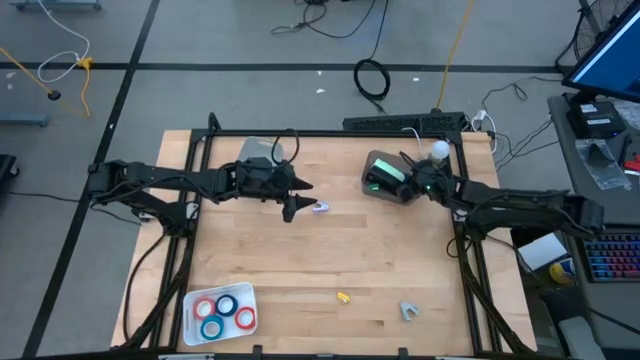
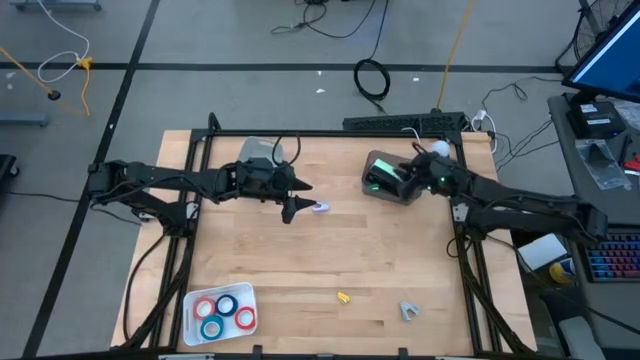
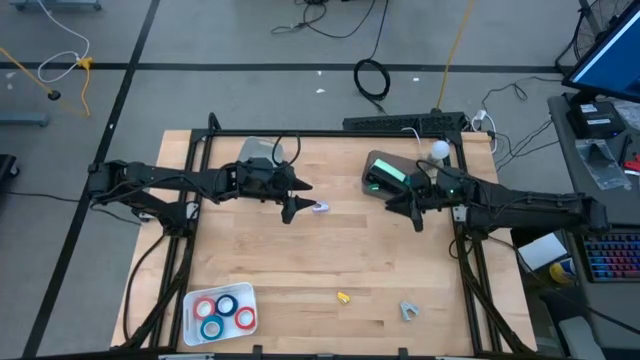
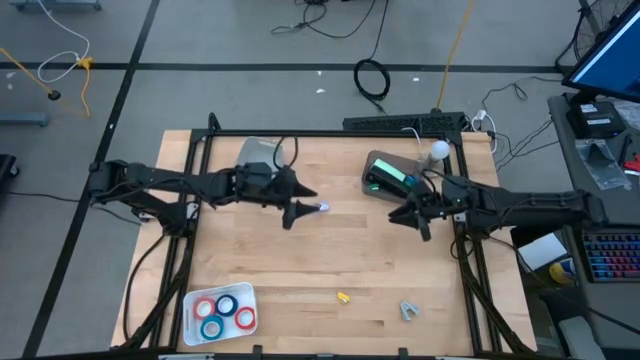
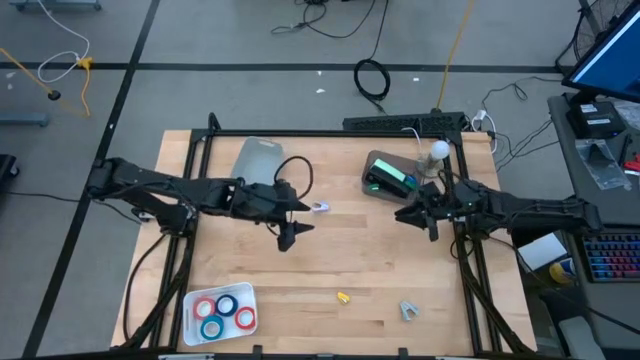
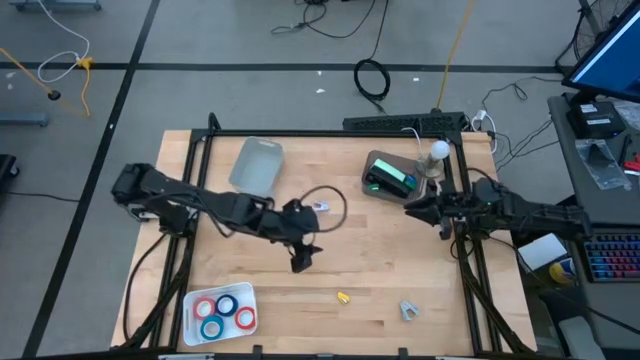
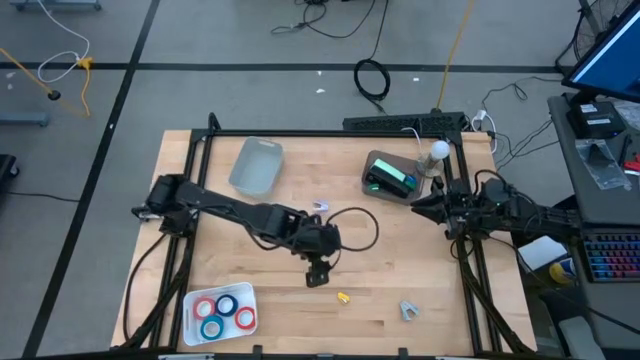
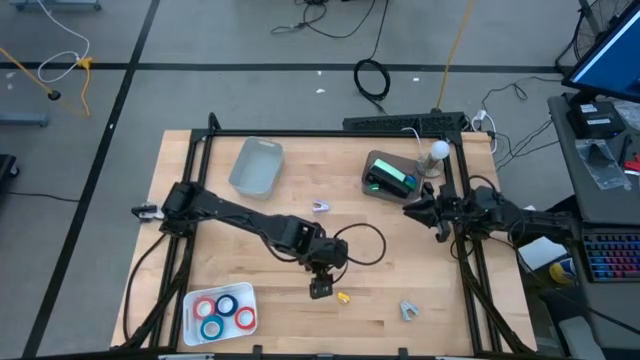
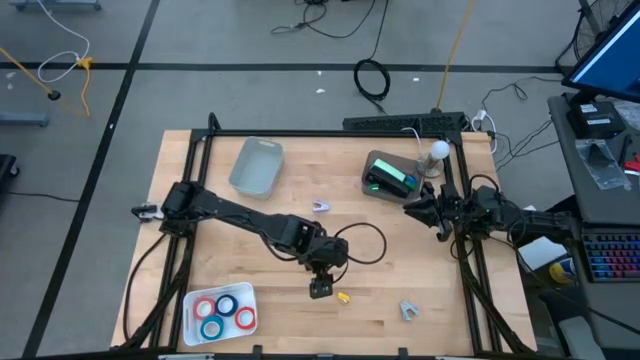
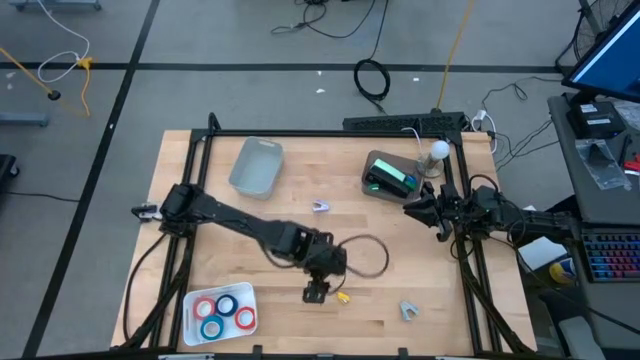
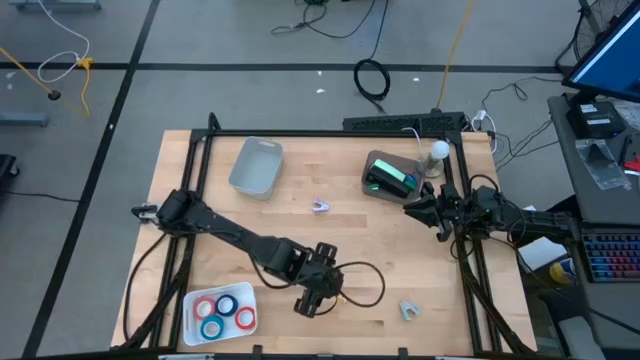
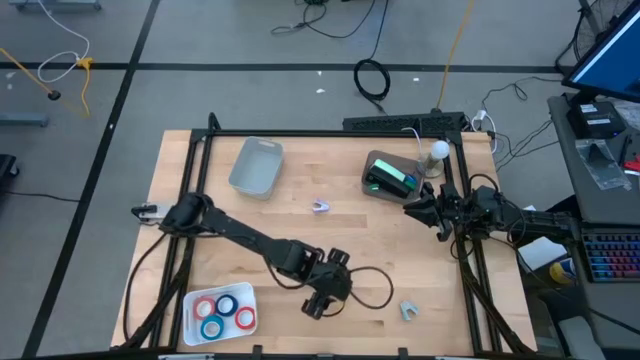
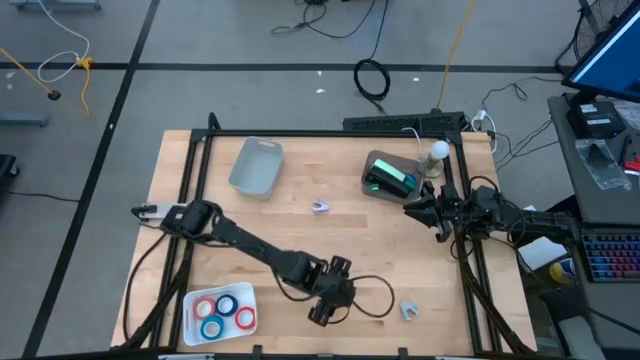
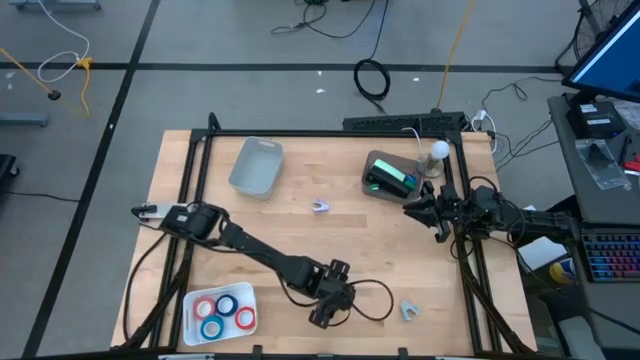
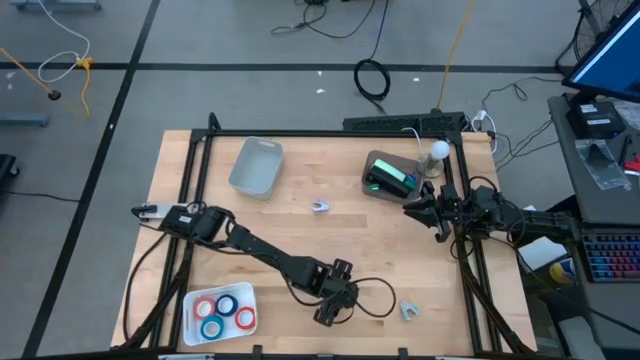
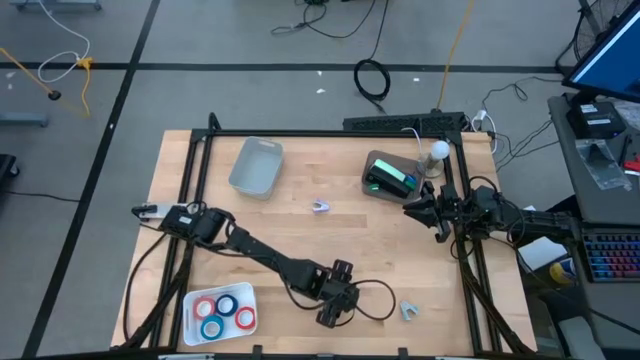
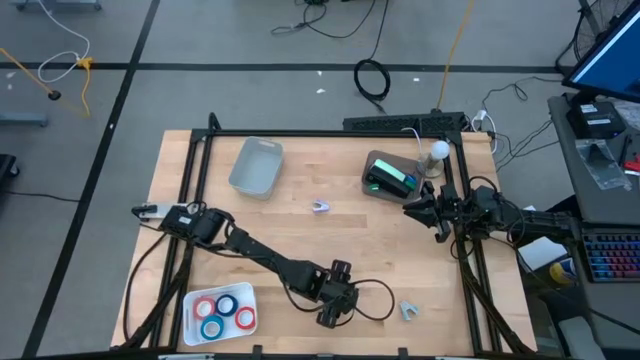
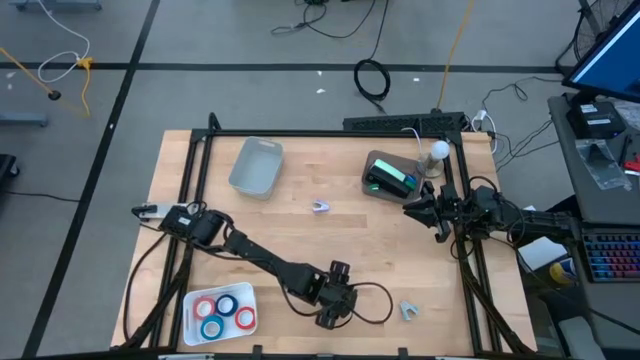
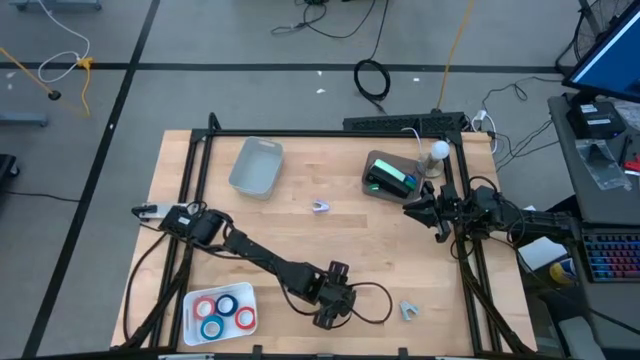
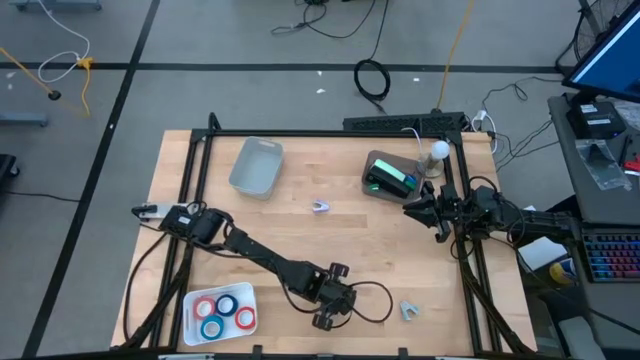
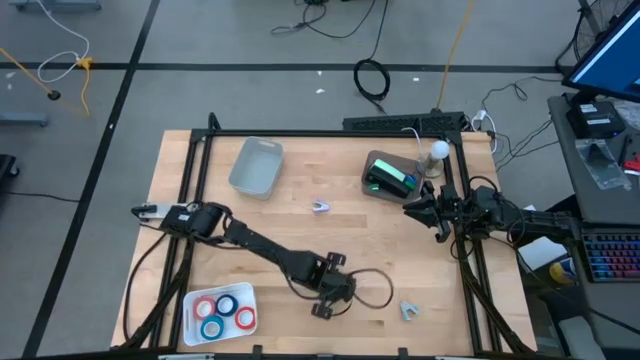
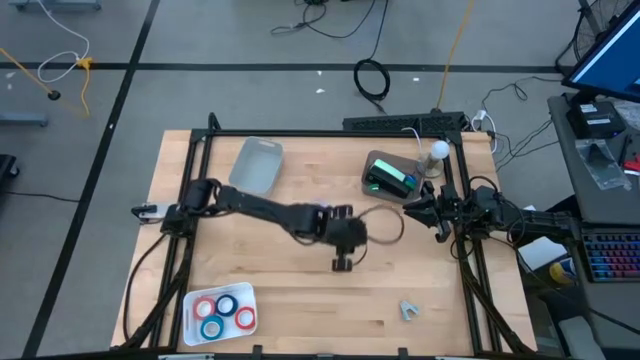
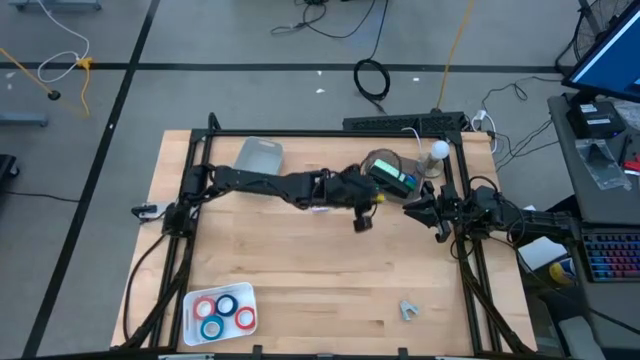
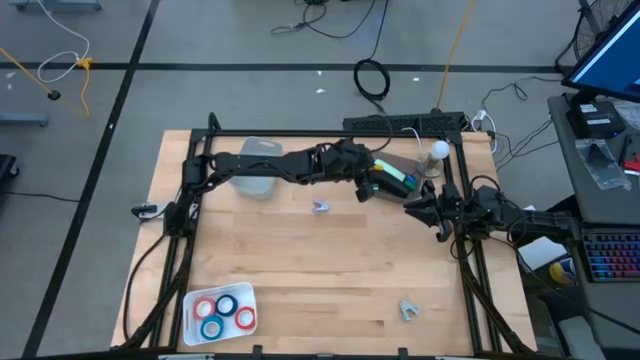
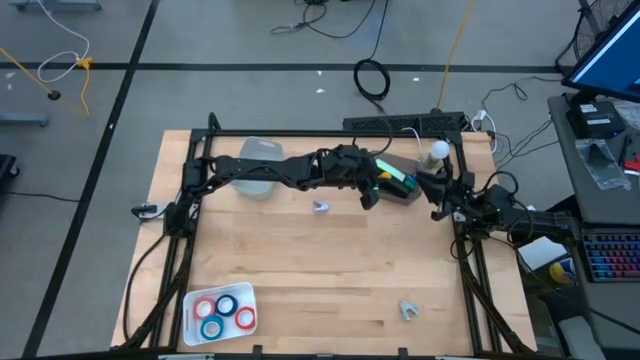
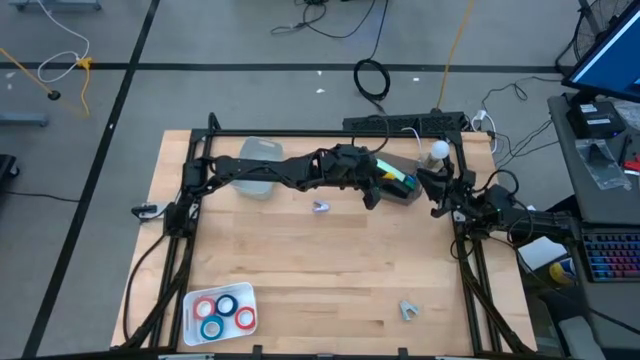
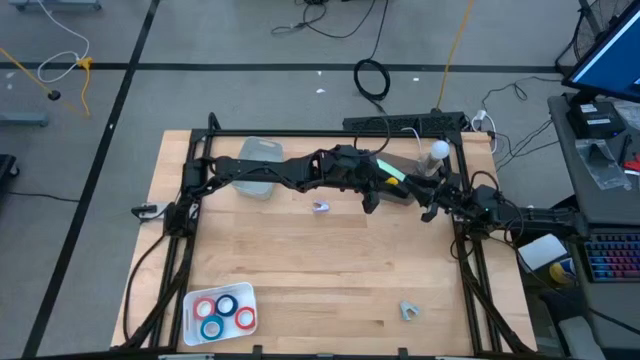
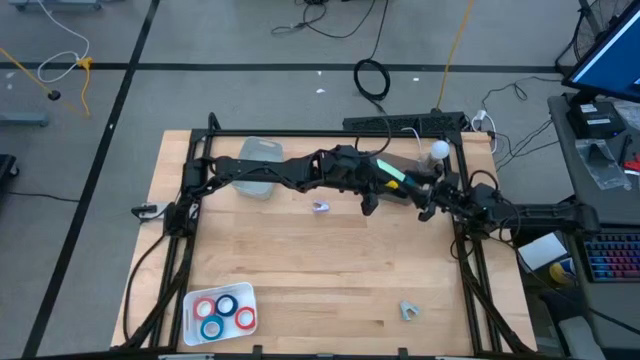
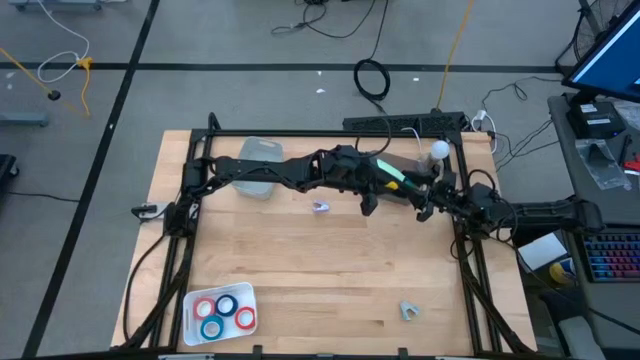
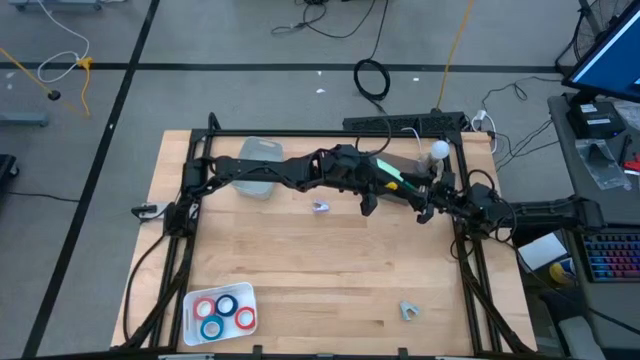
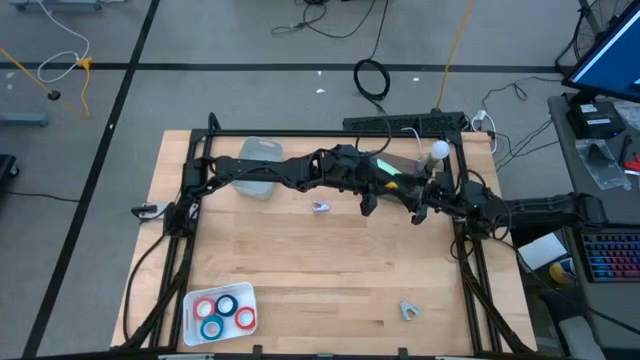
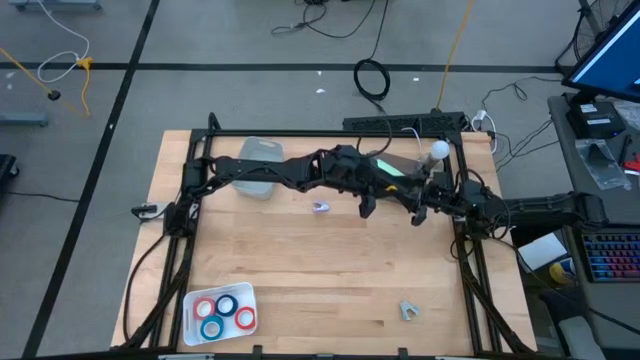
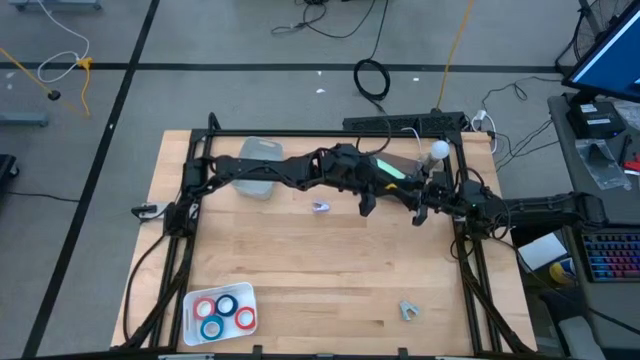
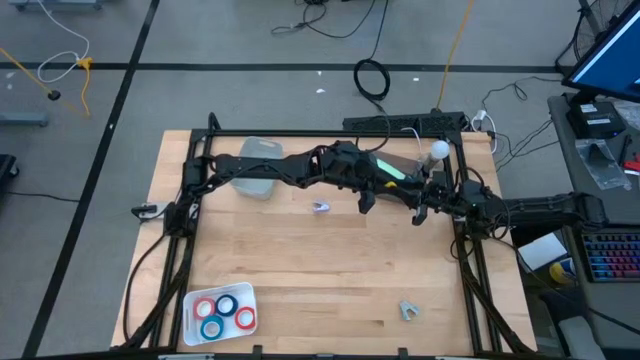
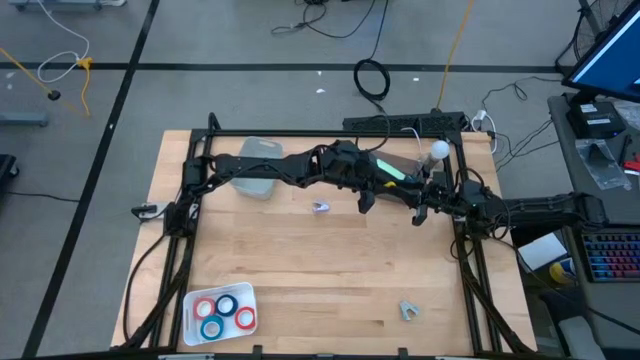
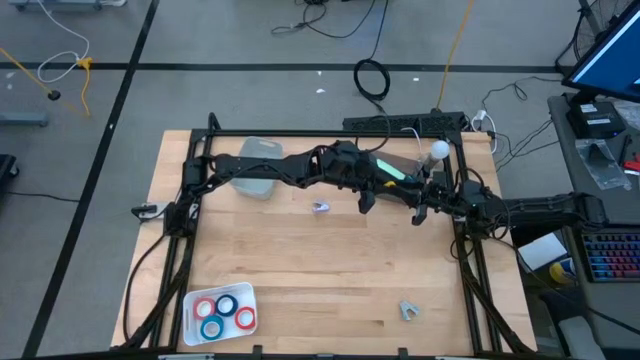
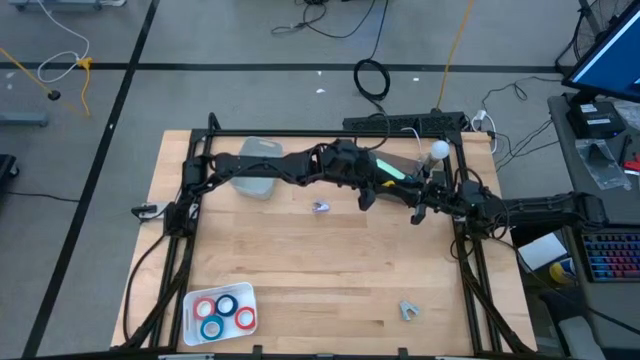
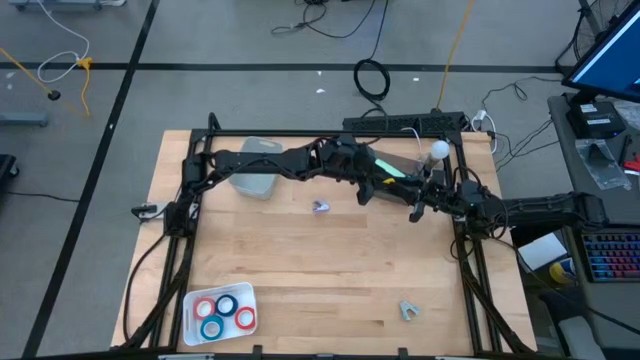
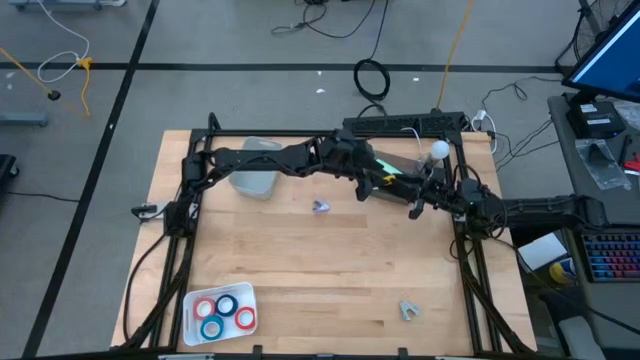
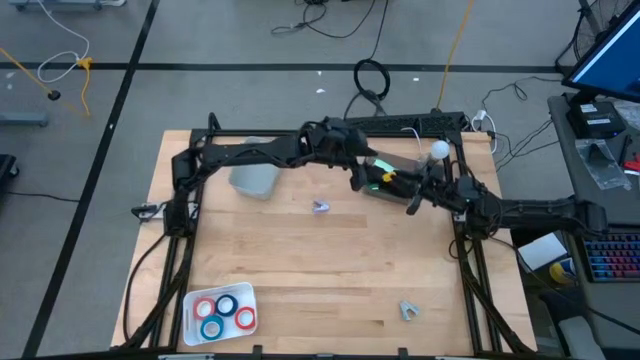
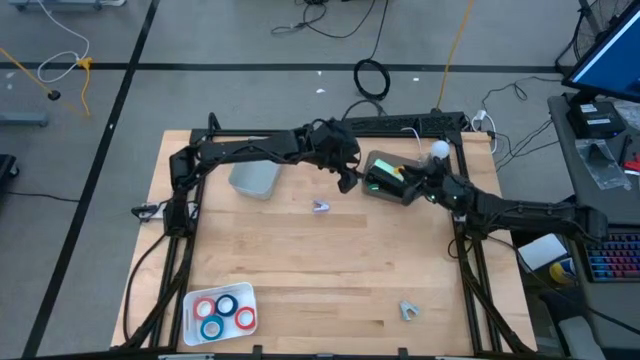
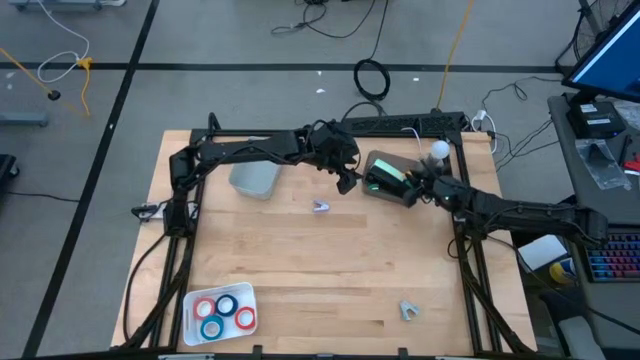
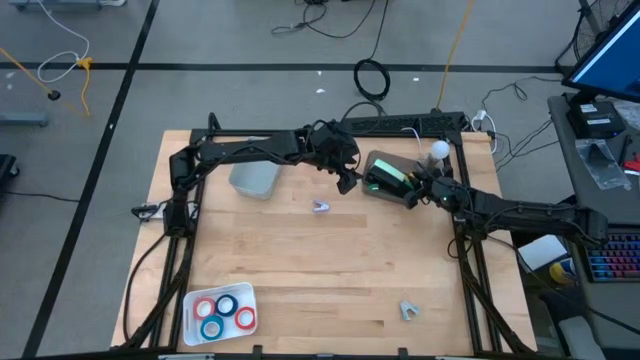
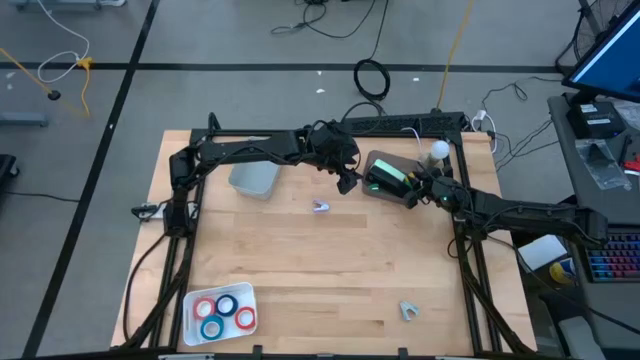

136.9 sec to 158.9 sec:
Task: Pick and place Stapler, Stapler remover, tape
Put the yellow small stapler into the black bin

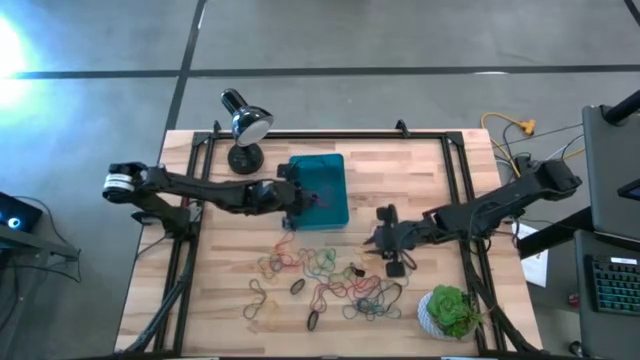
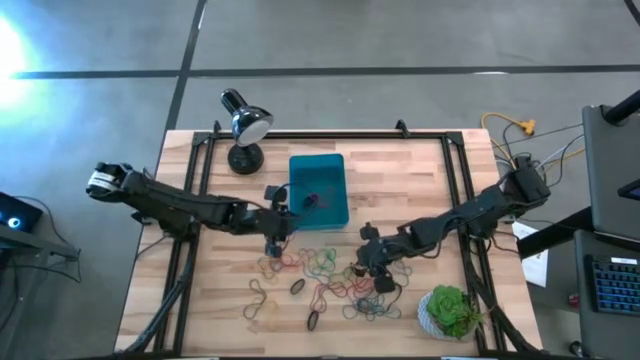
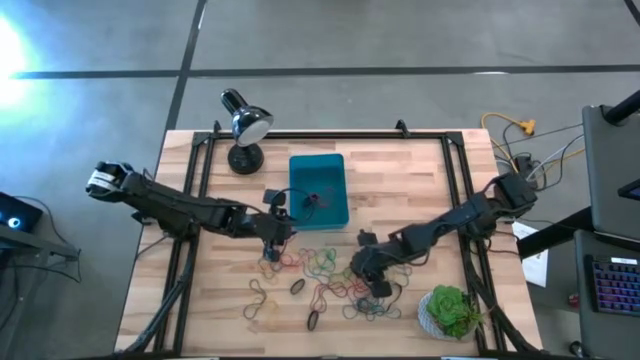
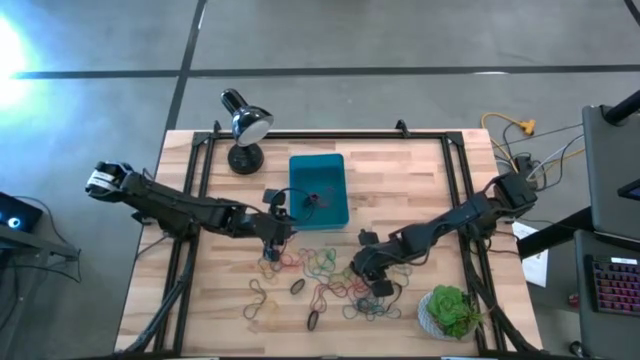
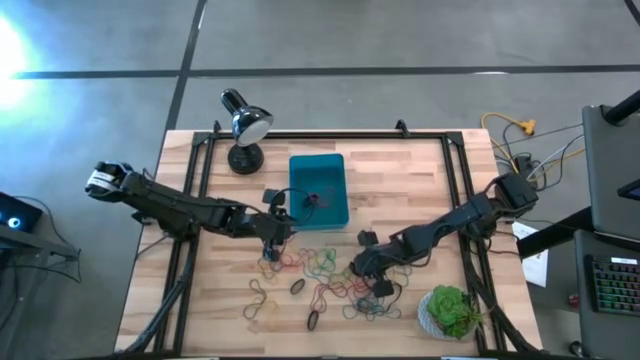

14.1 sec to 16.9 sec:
Task: Pick and place rubber bands into bin
Put the black rubber band into the blue bin
